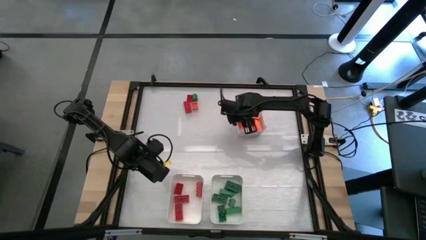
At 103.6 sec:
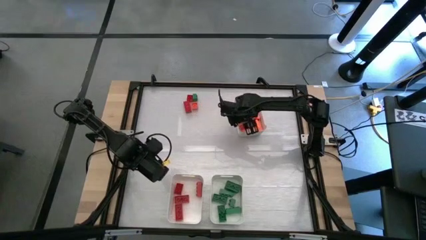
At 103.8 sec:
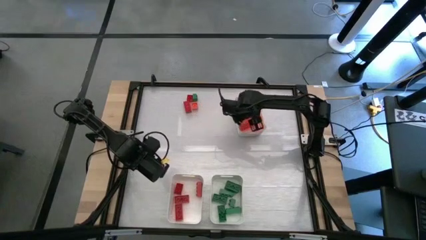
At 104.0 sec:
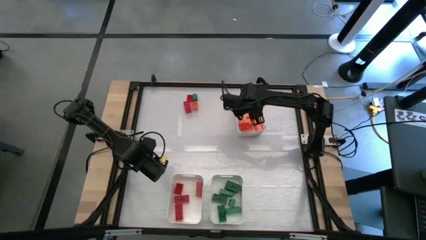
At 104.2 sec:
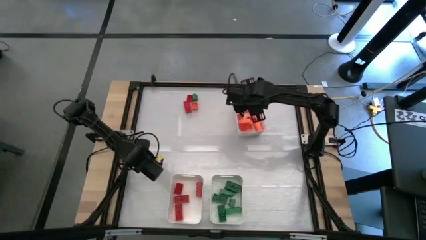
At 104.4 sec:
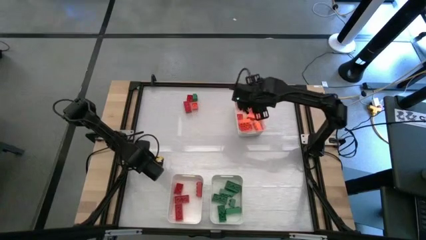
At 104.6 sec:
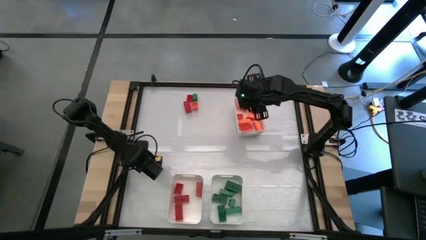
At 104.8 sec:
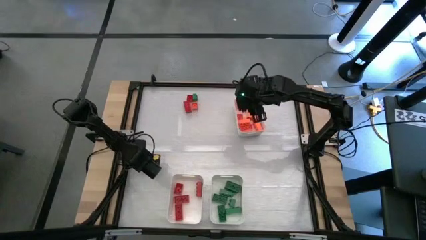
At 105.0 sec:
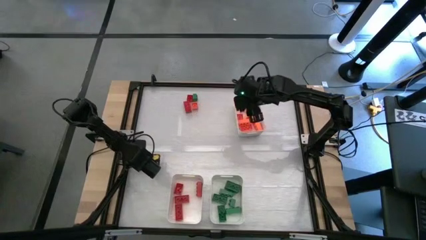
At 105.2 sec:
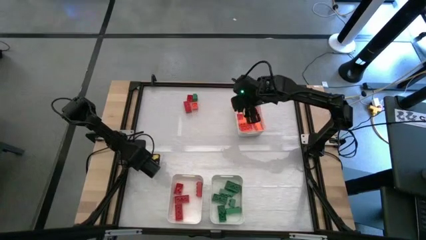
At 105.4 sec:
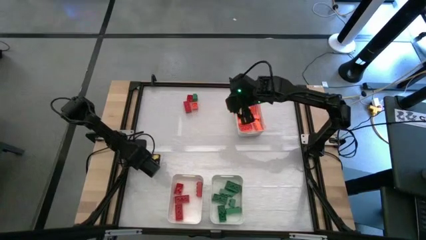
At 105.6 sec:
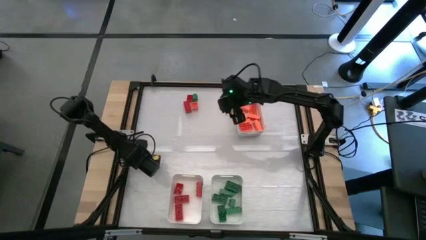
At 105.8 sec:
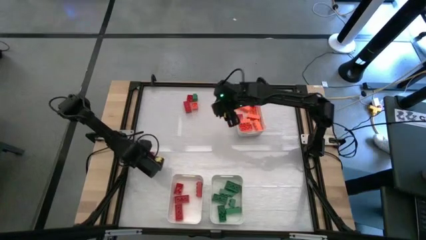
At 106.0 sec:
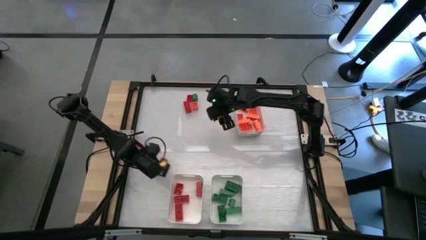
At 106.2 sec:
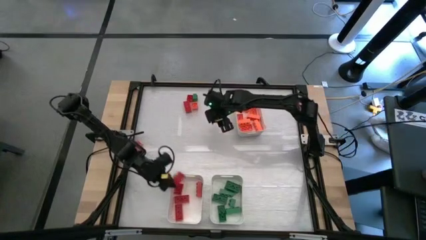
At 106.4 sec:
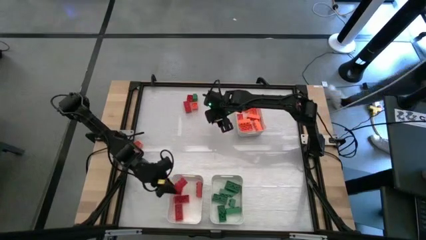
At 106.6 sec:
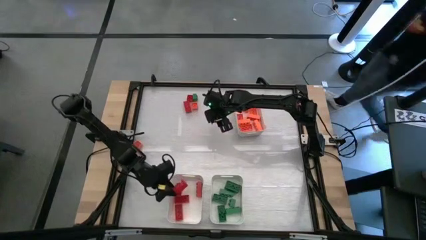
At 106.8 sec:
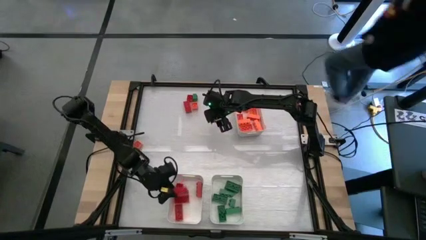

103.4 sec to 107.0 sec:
Task: Sort blocks
Put the red game piece into the bottom left white bin

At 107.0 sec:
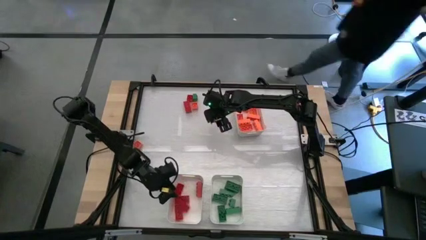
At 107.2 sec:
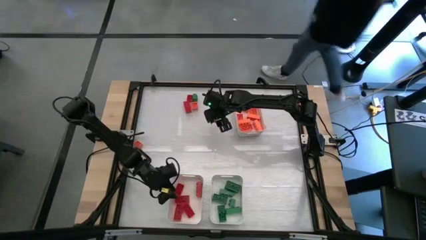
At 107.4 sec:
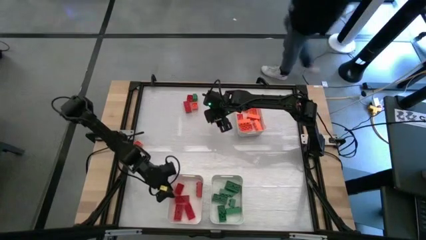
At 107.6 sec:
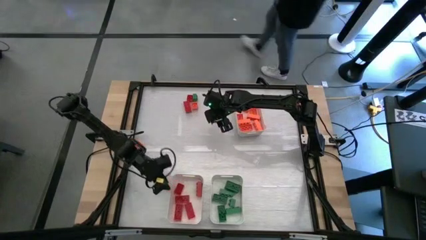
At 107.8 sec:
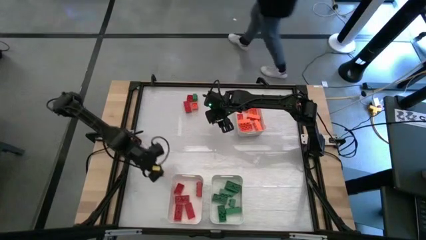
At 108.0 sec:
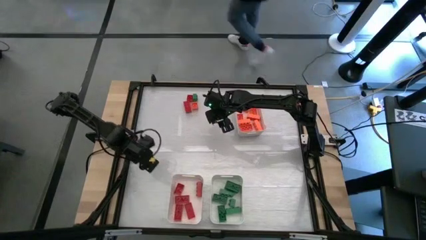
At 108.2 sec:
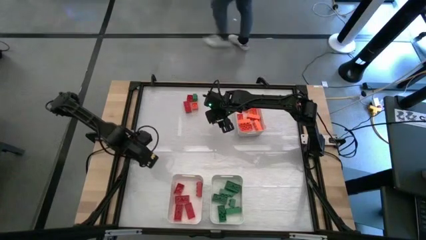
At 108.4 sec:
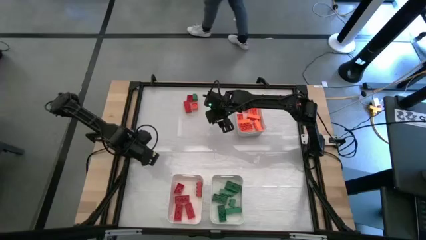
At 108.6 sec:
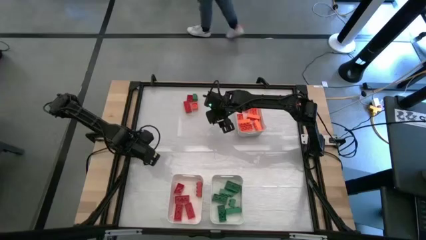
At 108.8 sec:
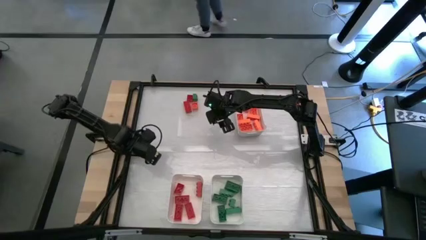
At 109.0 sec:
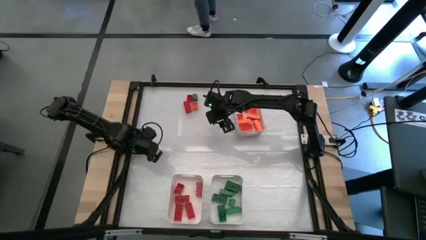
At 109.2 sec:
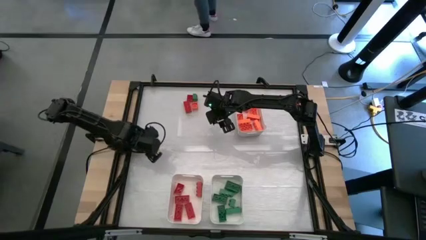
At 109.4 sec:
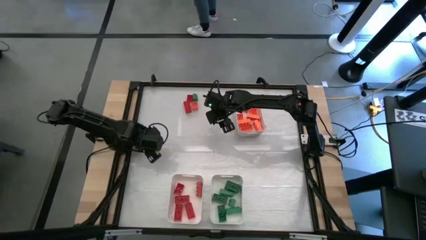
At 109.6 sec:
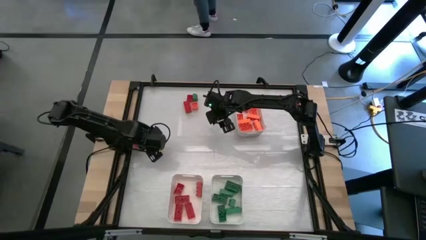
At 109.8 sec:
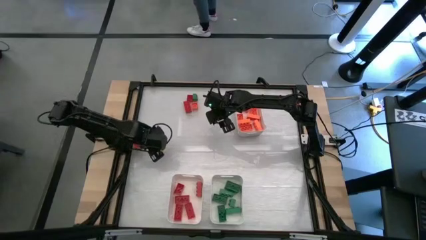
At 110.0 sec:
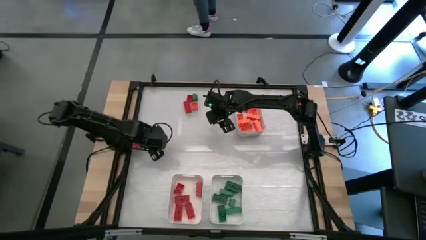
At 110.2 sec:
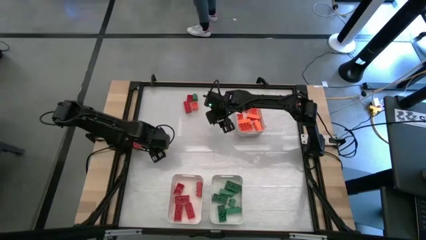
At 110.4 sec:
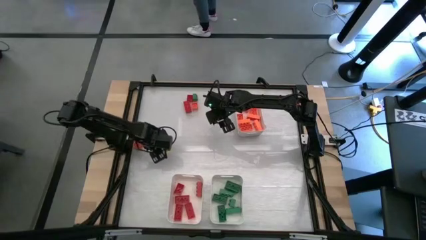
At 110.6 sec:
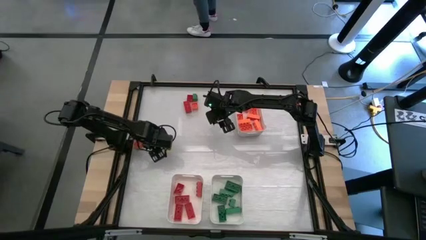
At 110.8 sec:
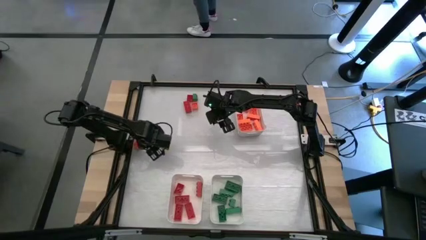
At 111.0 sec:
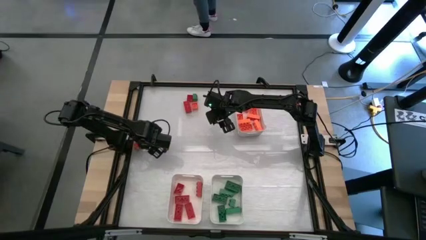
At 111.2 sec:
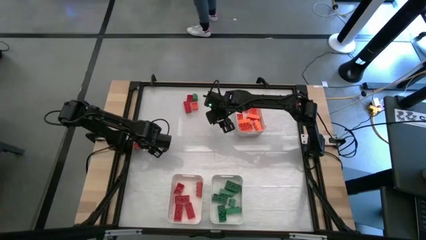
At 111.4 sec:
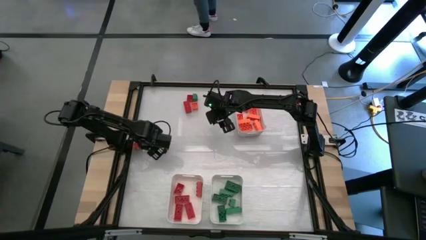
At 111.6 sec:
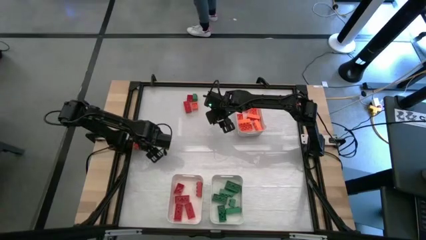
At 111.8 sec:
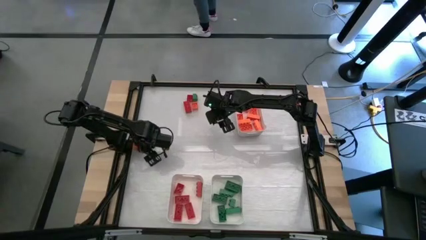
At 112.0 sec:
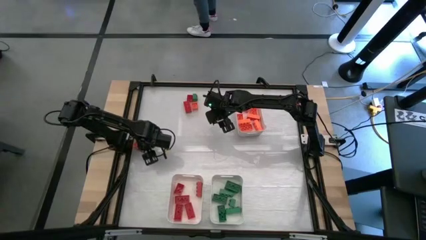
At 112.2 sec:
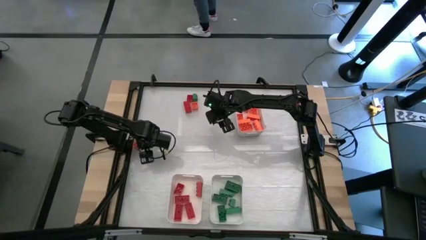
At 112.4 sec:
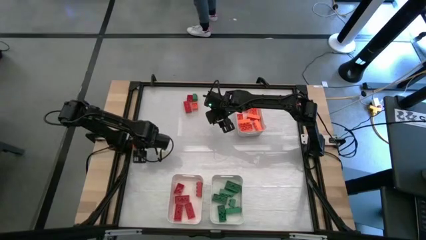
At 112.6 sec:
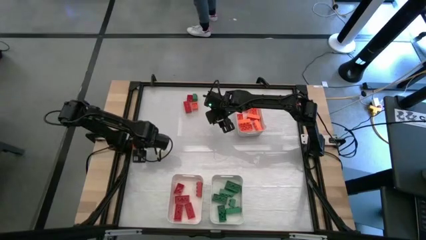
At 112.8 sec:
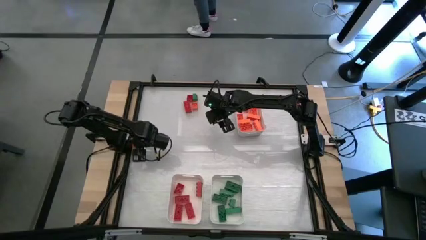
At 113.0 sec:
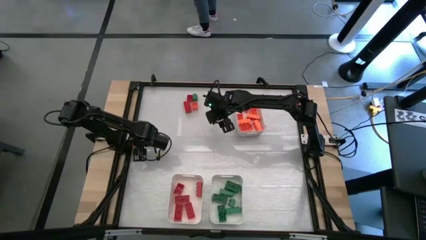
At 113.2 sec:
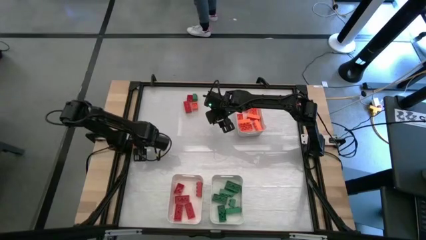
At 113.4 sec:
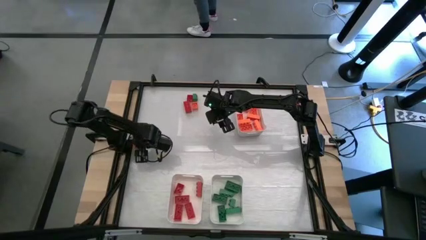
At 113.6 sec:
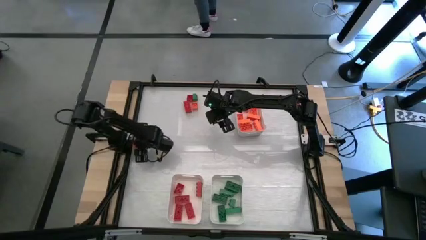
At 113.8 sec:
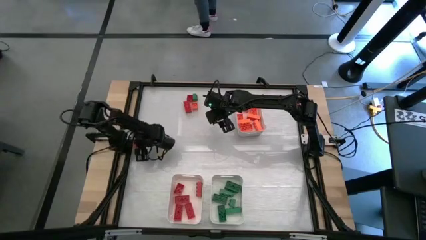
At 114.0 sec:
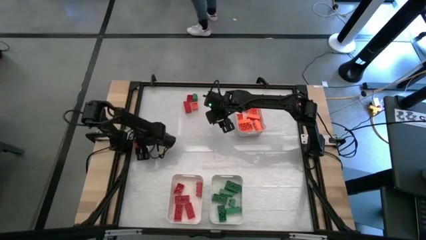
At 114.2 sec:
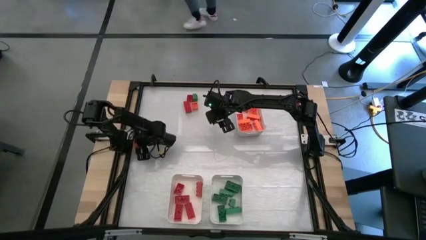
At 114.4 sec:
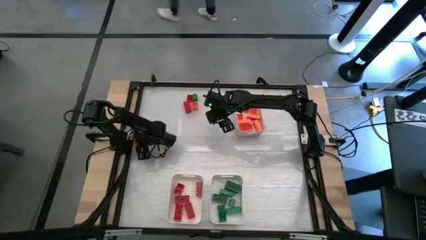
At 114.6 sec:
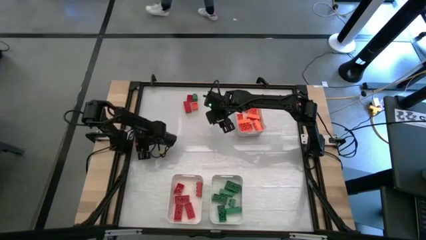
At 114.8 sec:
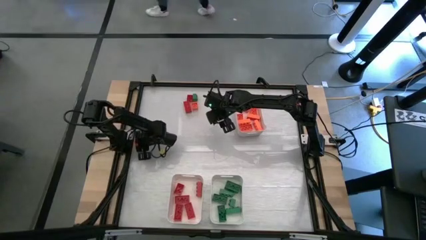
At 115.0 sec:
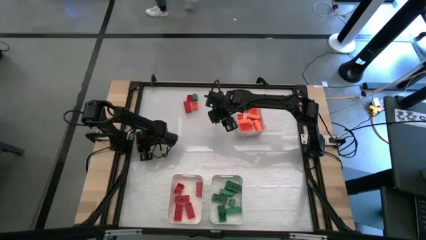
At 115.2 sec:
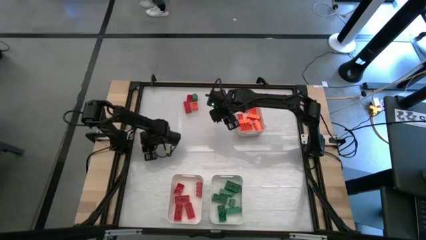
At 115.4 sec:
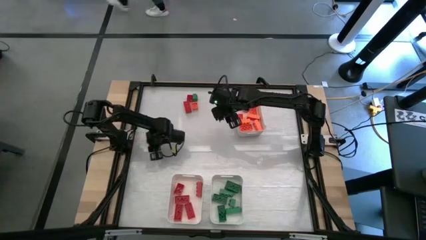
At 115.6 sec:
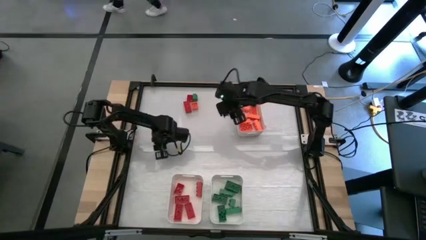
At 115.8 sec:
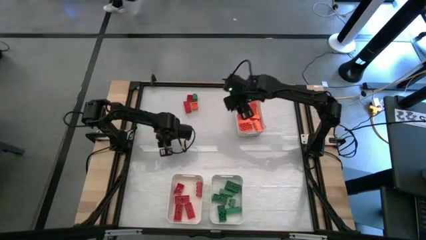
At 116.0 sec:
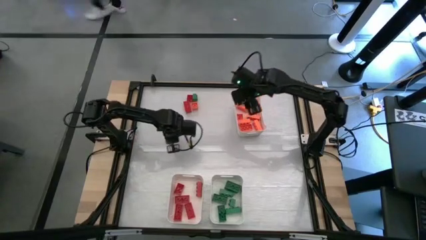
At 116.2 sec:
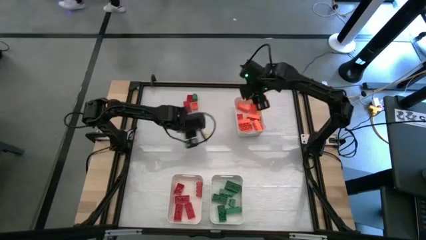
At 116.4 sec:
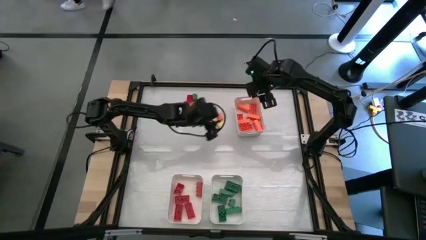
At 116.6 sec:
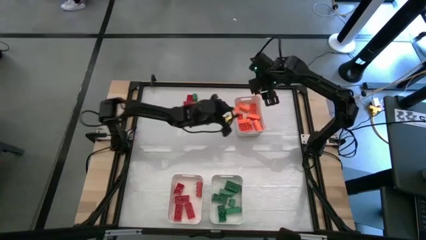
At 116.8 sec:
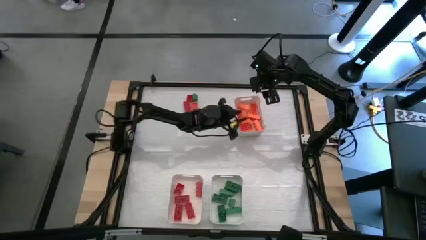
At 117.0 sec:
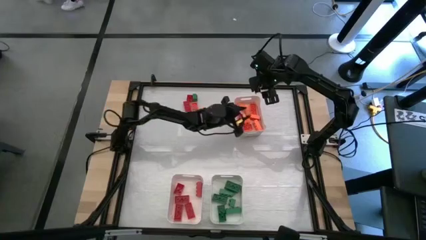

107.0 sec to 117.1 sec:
Put the orange game piece into the right white bin

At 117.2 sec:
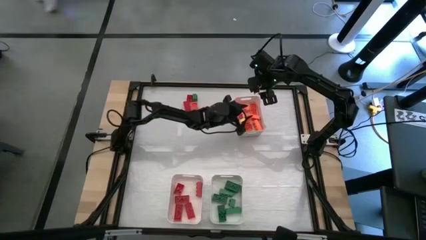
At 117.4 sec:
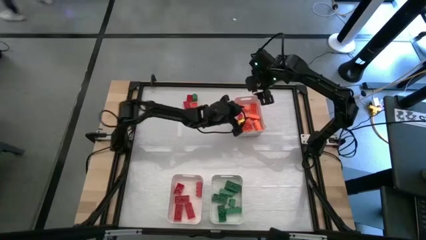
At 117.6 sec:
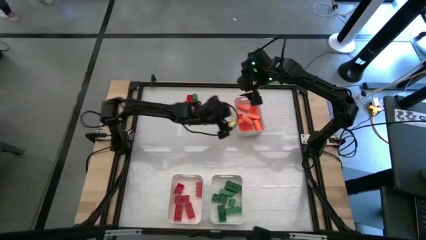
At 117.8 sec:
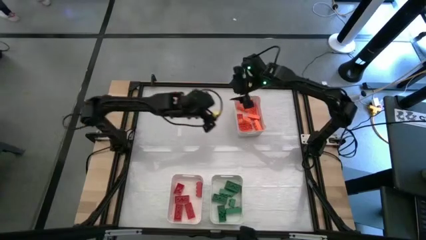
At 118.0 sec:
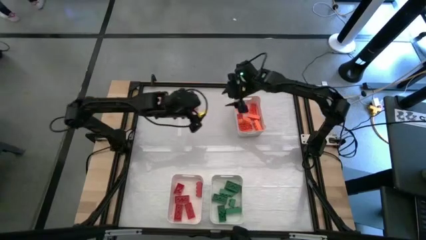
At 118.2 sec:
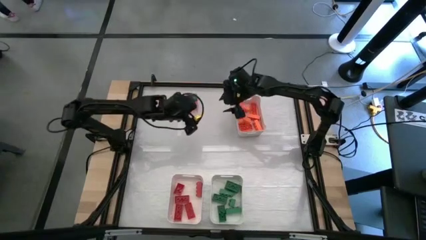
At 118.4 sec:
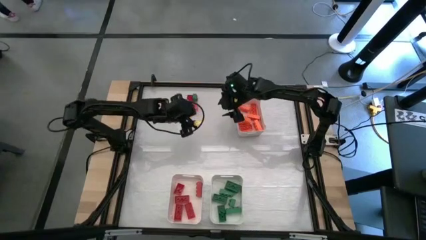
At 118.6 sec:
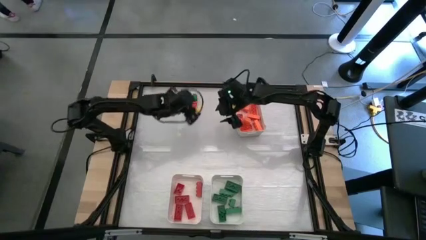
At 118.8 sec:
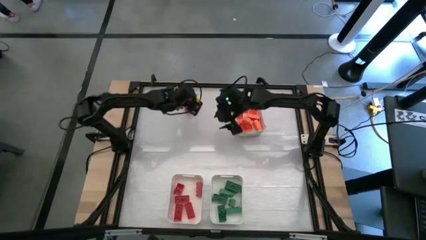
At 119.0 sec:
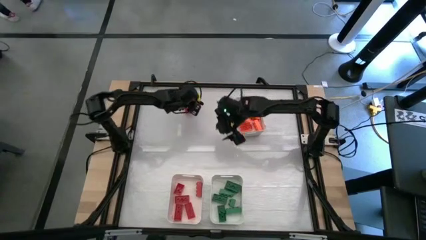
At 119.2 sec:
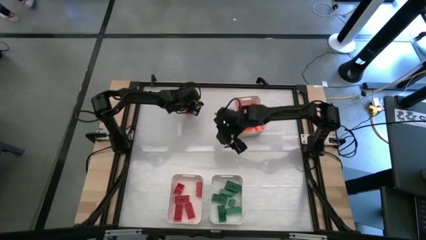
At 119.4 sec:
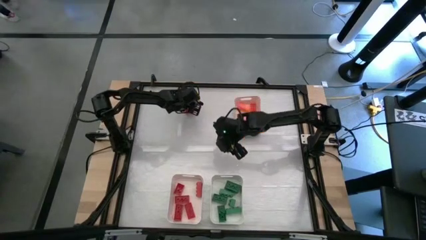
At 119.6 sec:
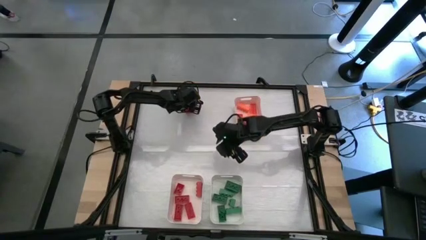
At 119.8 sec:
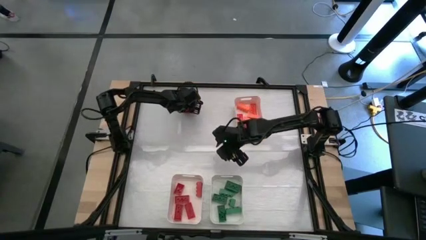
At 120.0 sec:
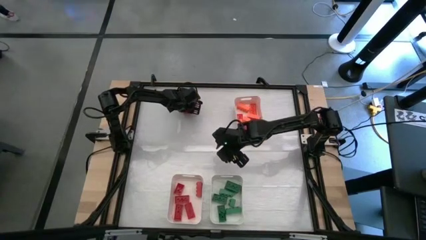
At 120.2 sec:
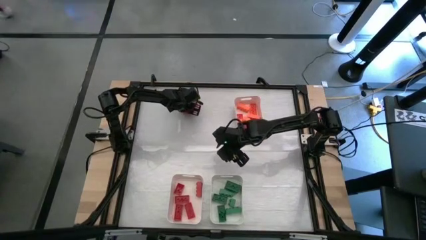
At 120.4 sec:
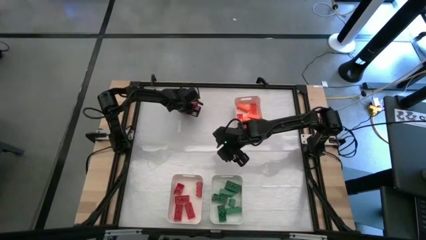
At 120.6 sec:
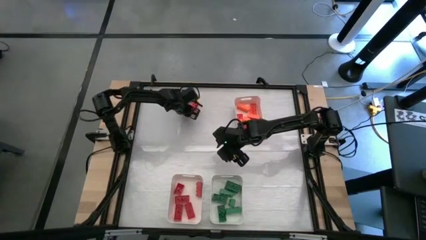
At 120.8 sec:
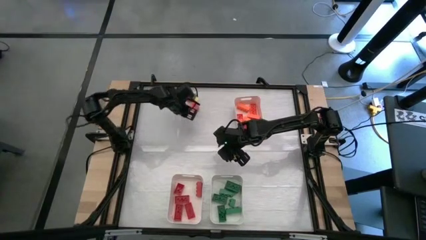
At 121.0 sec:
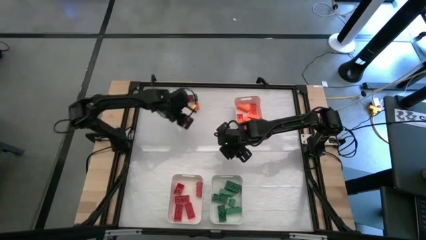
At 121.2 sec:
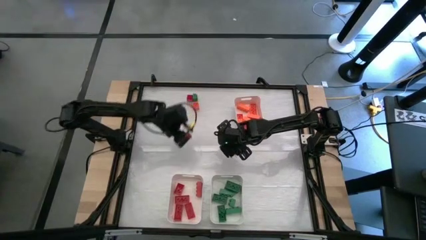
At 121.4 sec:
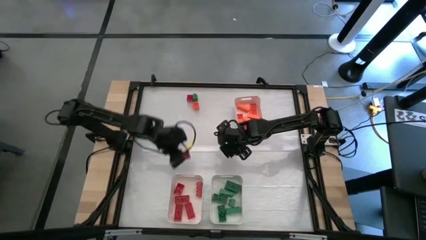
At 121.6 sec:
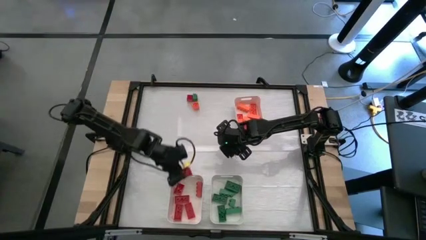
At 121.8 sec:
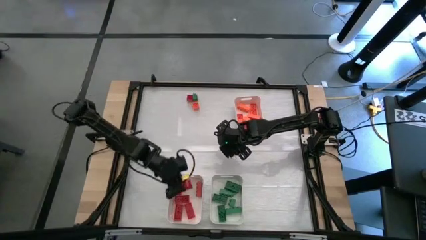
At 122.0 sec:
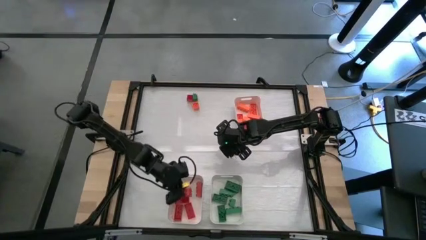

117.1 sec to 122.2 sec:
Put the red game piece into the bottom left white bin
